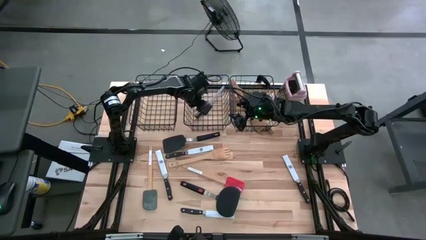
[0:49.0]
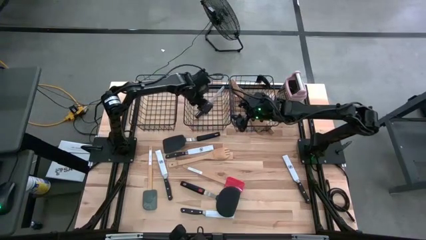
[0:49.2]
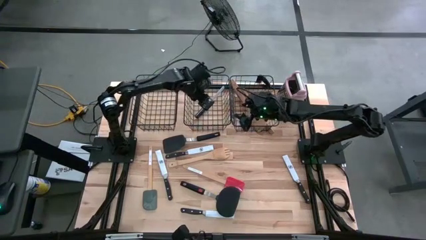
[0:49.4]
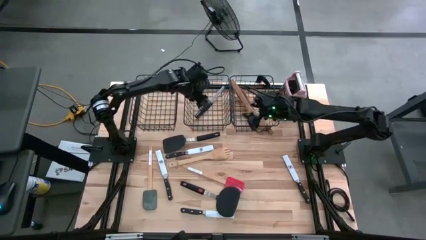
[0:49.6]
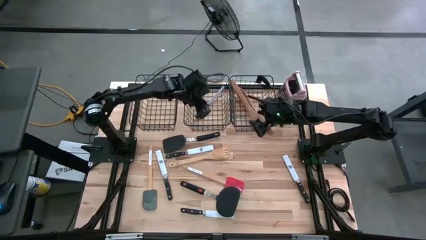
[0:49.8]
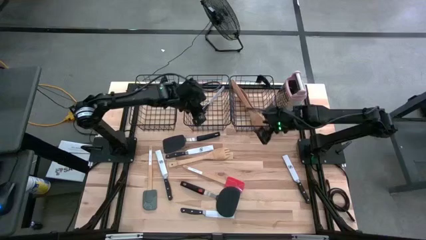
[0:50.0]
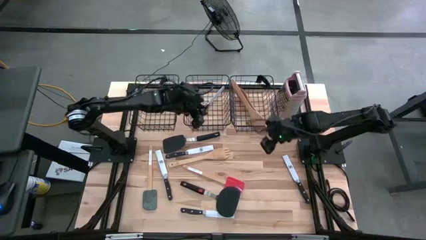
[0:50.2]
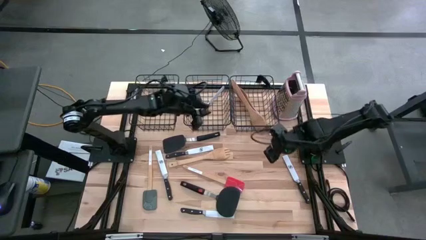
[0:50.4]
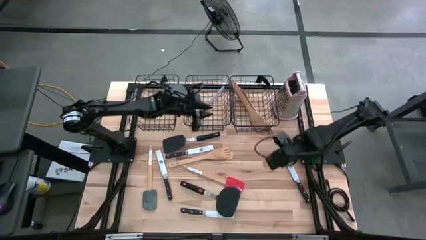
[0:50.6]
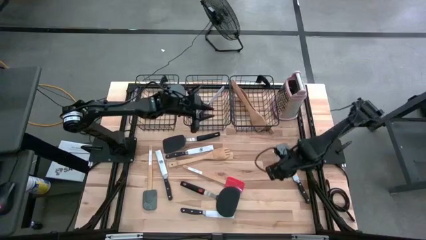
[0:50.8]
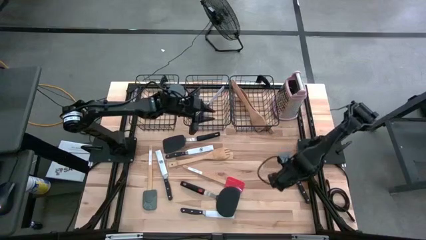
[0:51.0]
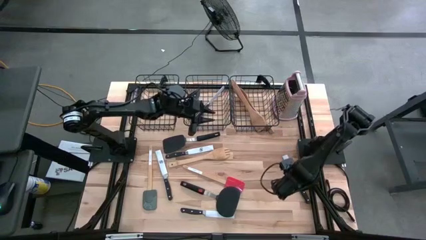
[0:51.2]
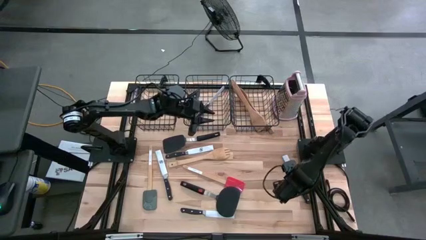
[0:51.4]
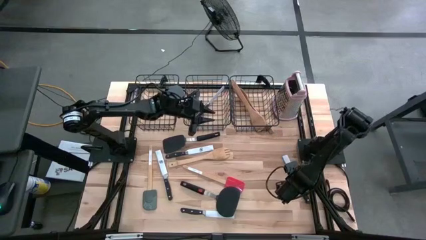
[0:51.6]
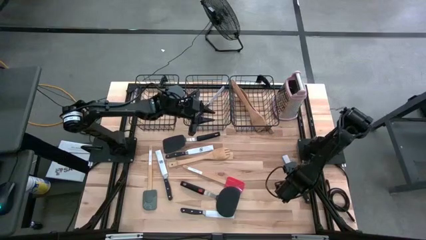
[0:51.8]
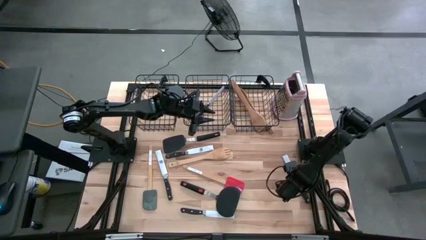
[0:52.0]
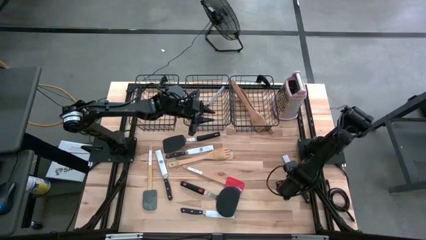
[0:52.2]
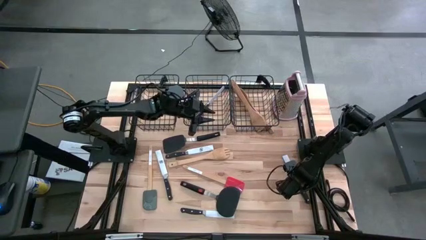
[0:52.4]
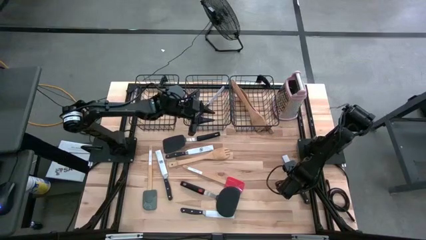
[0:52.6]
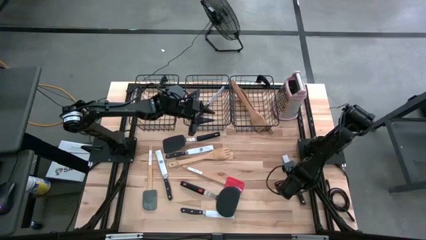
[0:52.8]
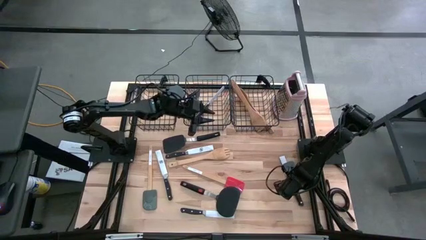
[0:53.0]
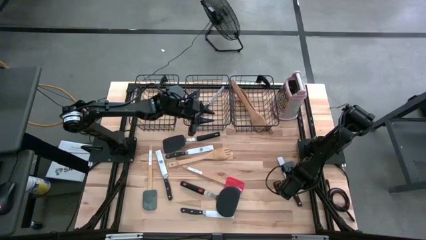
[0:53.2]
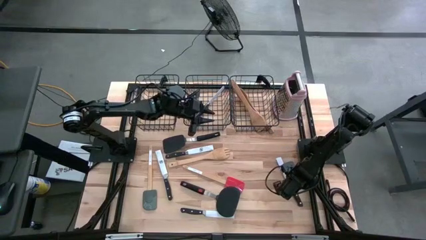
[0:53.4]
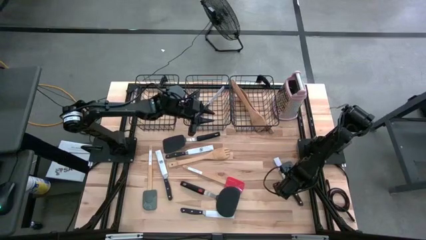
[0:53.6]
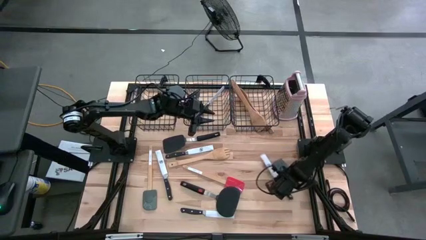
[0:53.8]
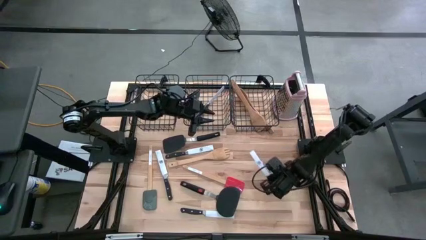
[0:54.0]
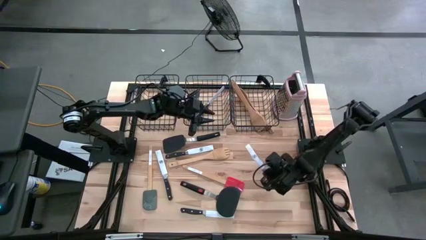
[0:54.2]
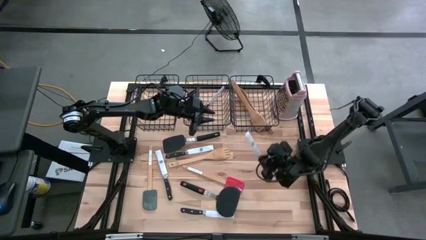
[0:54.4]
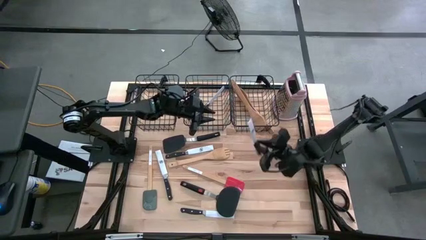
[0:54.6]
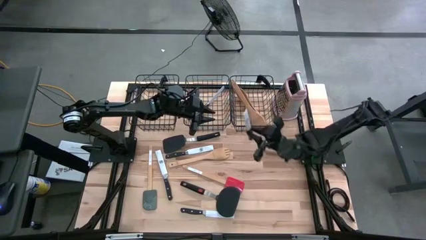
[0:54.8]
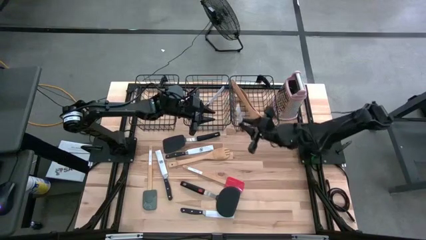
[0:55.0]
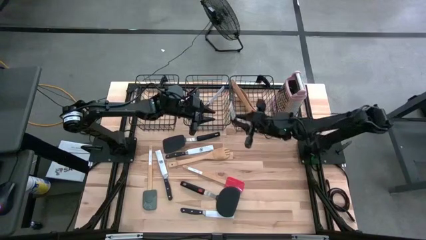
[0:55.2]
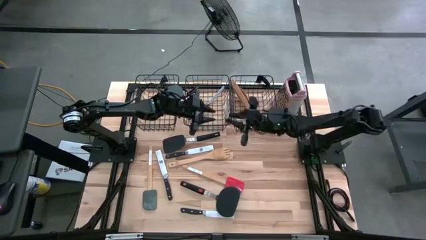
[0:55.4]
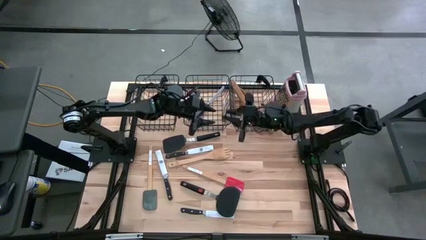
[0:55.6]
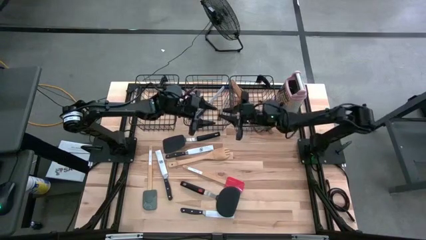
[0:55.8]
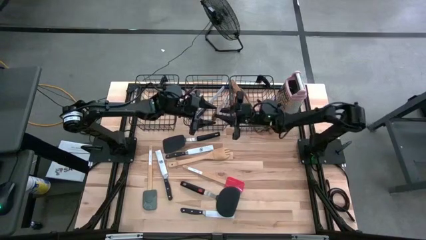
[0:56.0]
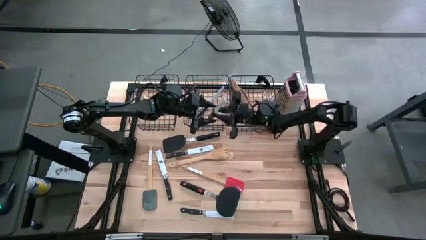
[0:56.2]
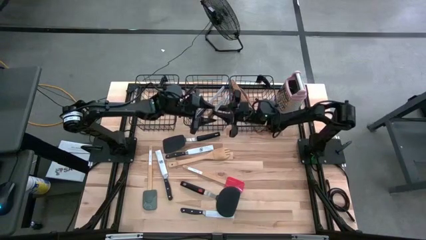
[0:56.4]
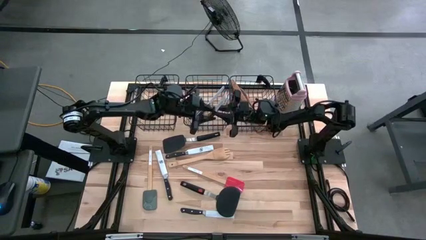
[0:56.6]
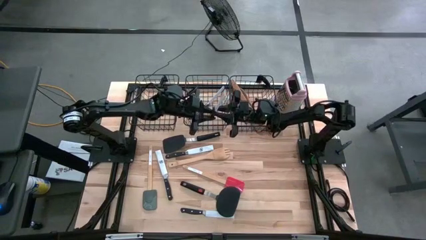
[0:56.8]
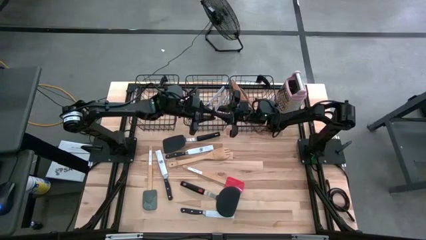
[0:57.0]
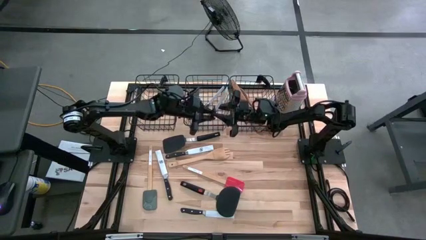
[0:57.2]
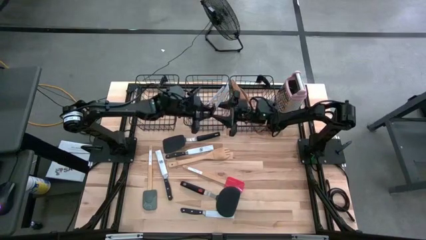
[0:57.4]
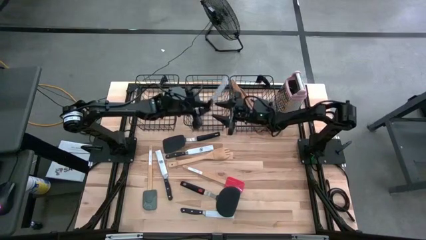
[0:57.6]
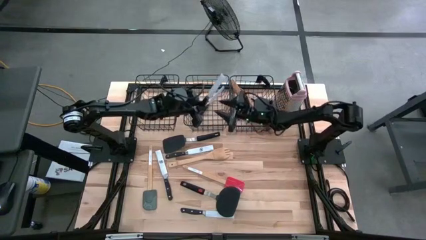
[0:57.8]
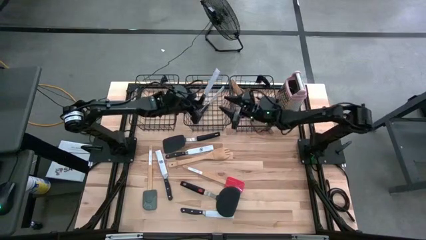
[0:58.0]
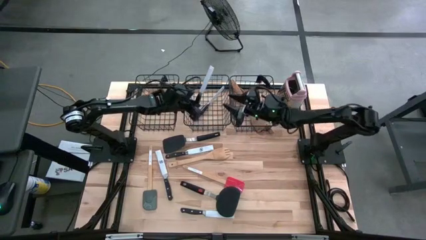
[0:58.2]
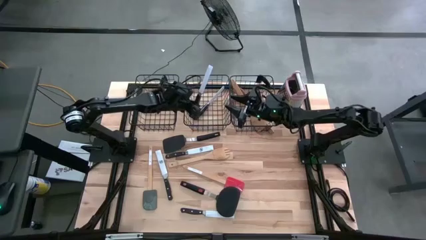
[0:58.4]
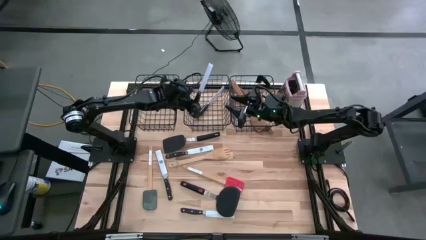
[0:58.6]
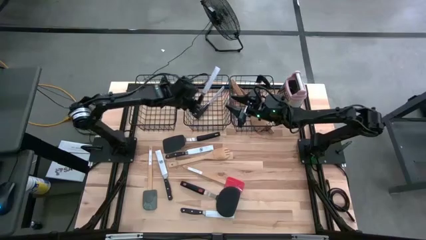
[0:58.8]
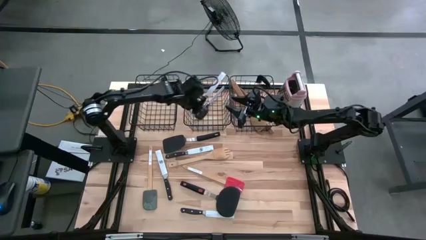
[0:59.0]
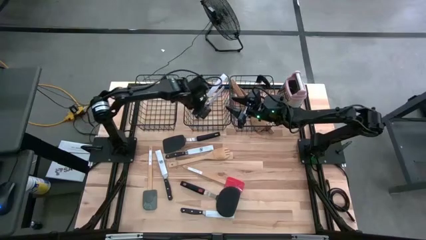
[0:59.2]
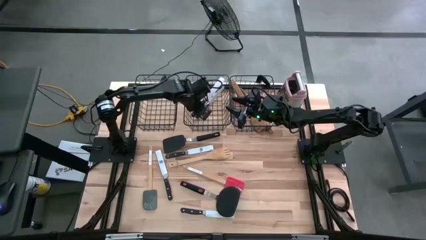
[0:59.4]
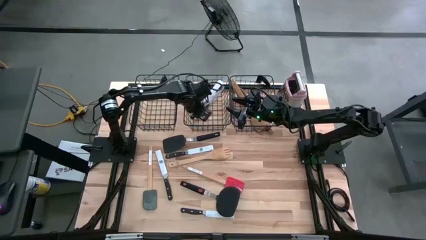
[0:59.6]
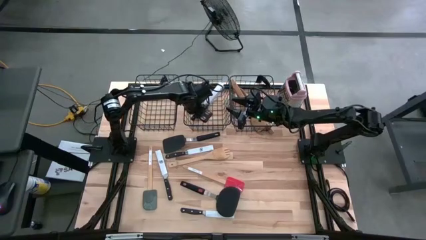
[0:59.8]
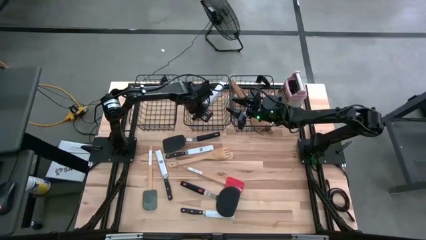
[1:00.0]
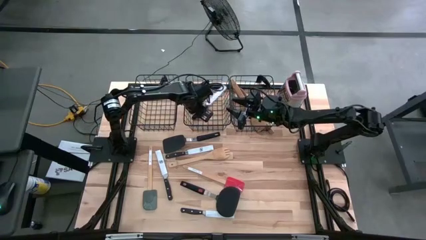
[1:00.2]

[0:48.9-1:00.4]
Task: Pick & Place Kitchen Items
Put the black knife into the middle black wire basket
